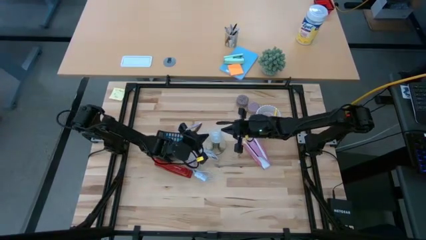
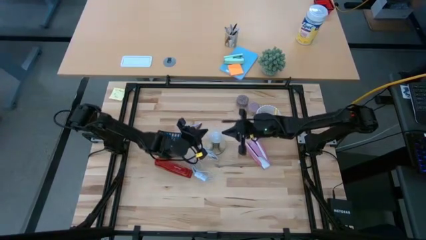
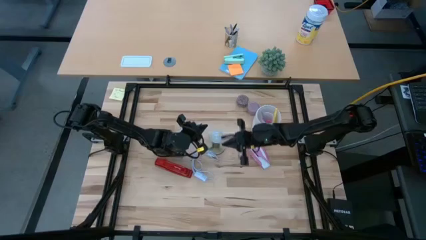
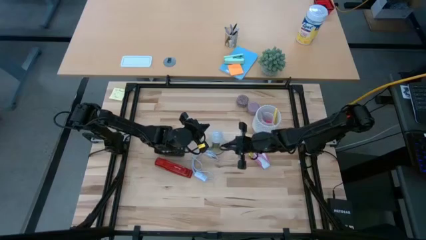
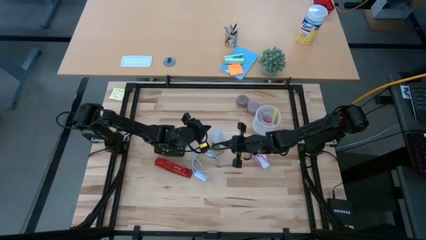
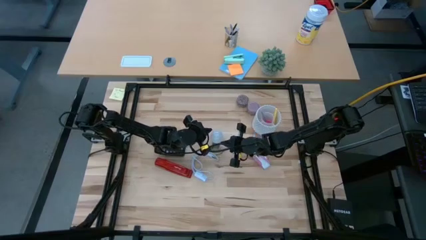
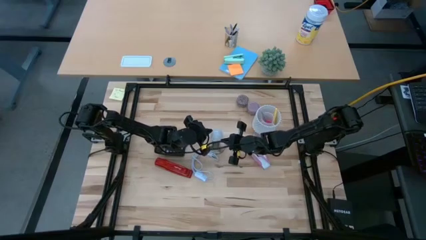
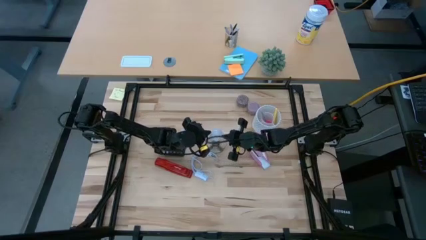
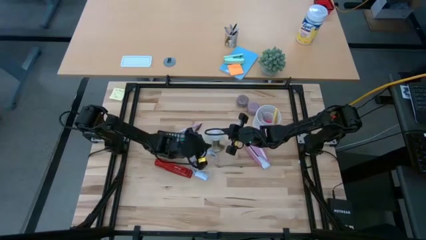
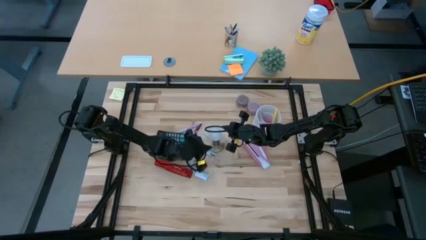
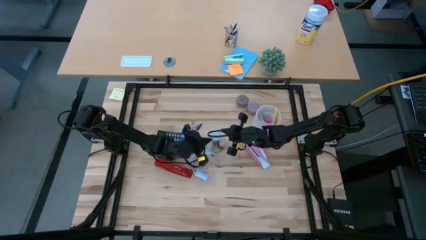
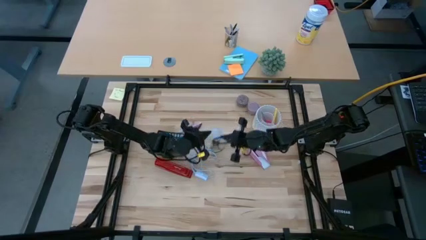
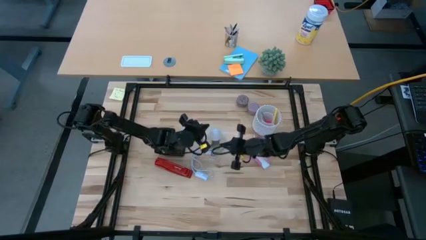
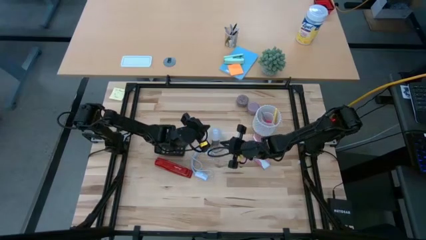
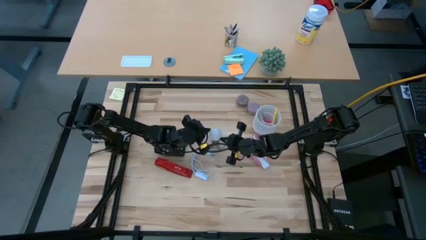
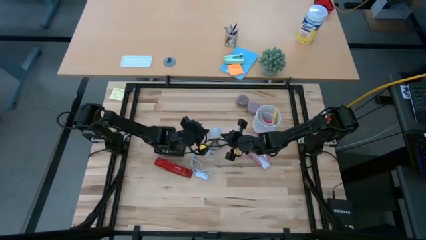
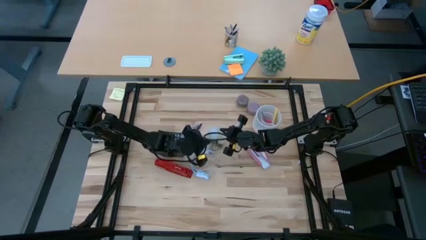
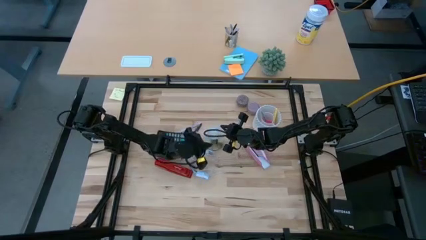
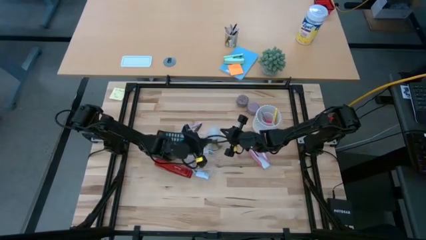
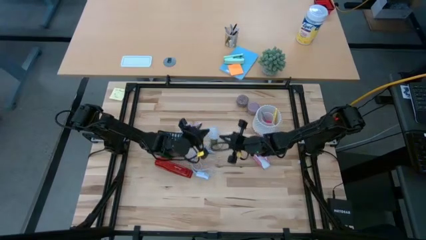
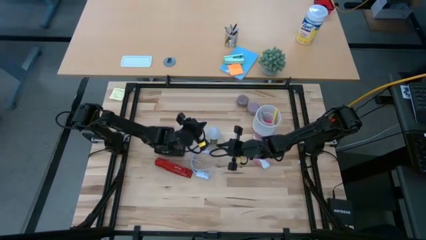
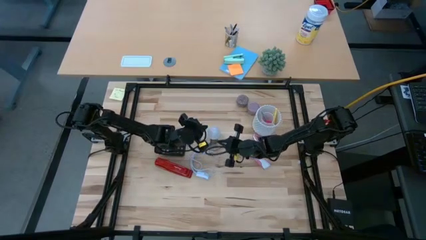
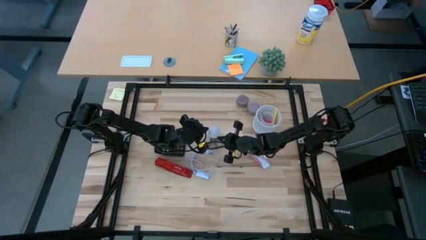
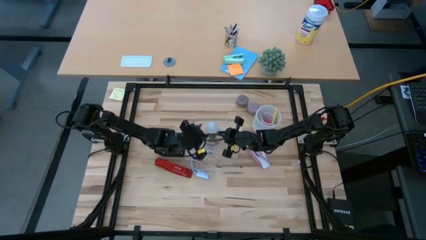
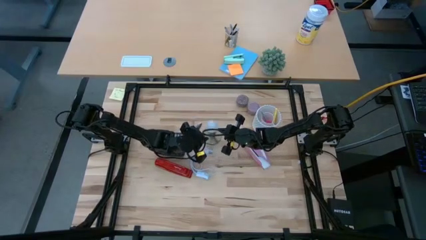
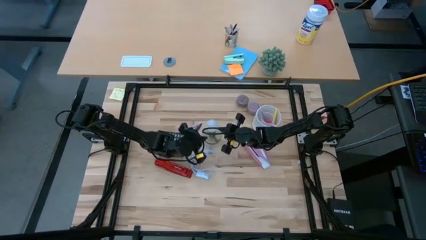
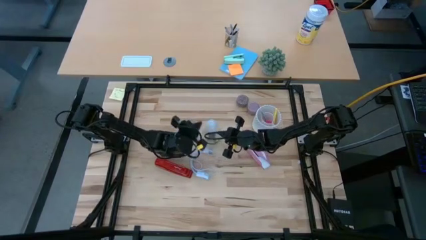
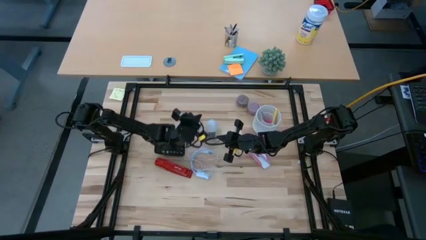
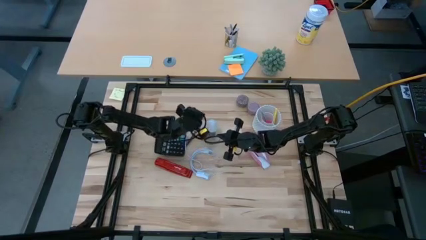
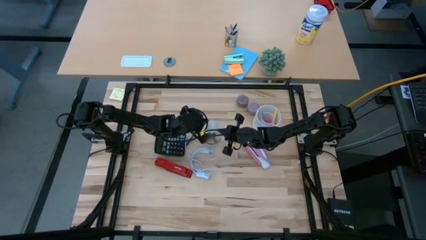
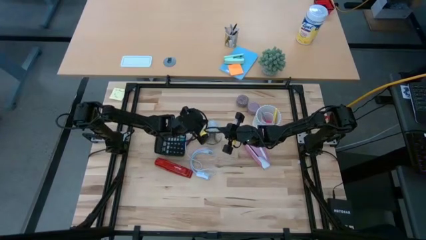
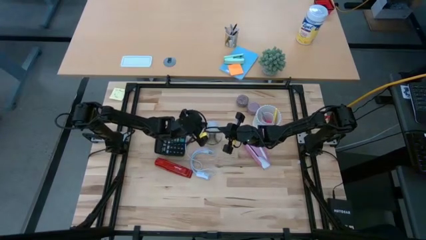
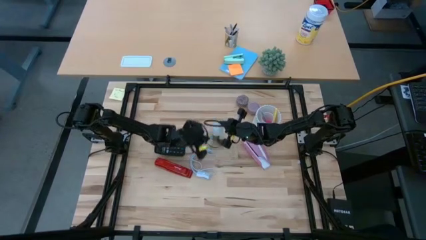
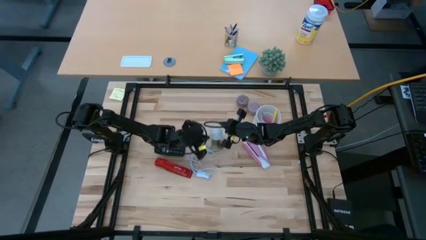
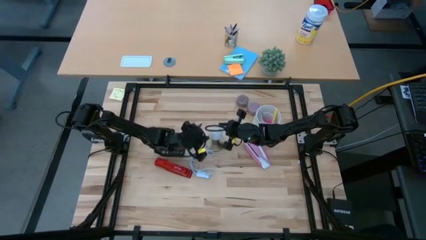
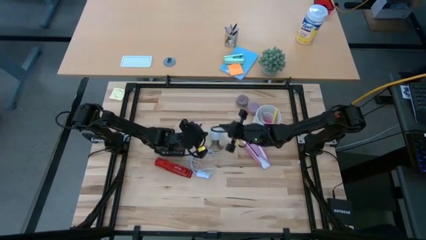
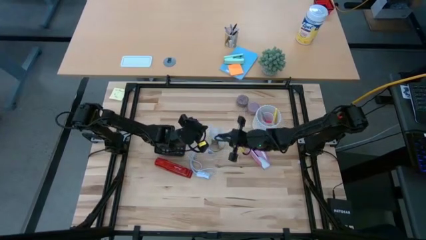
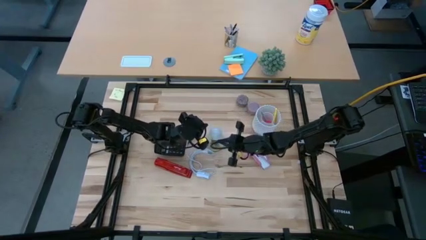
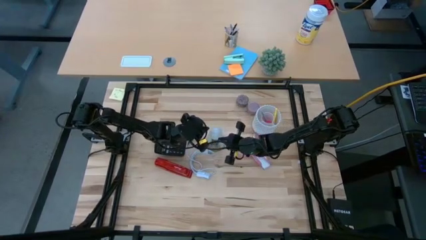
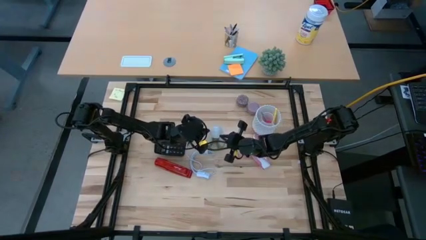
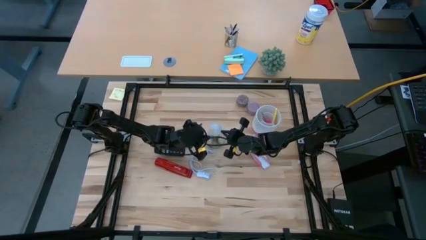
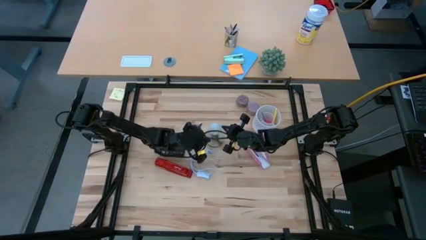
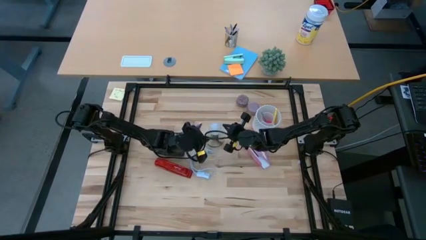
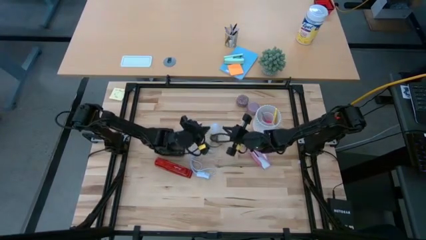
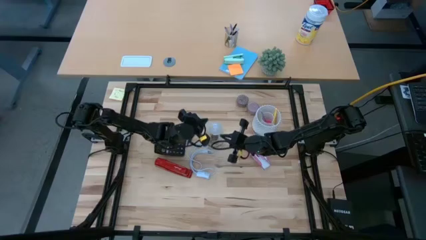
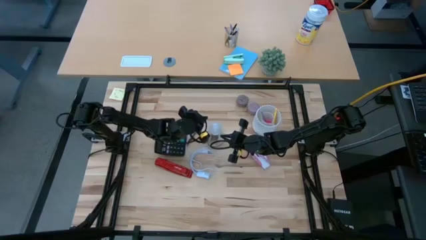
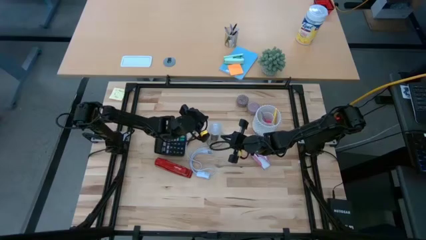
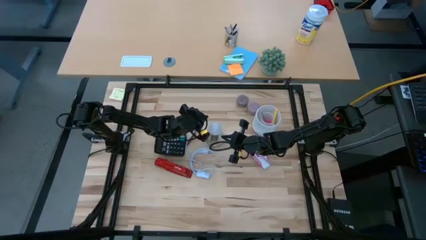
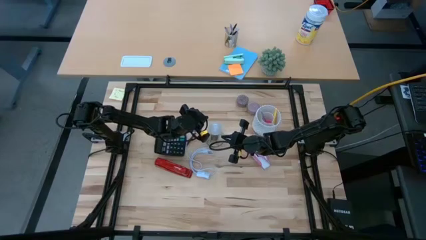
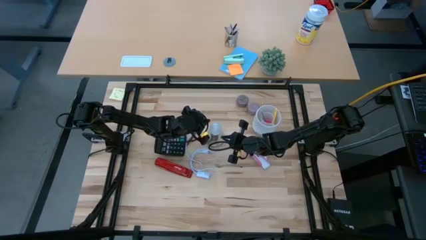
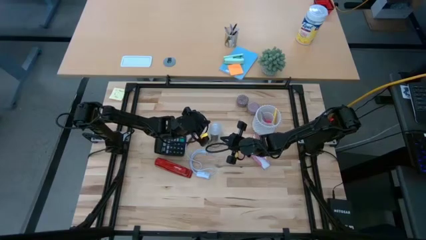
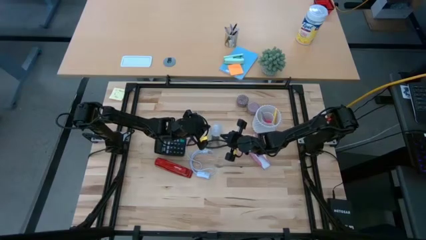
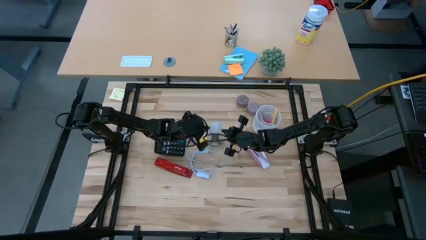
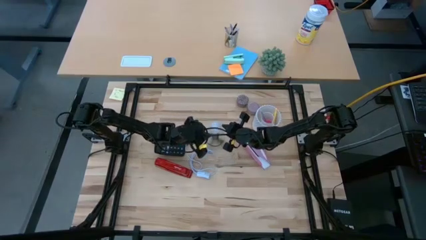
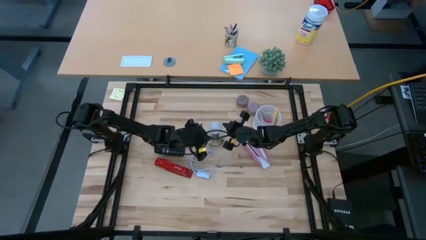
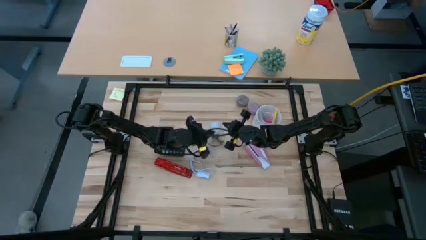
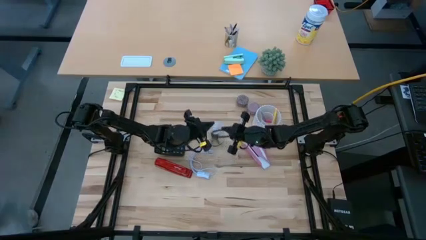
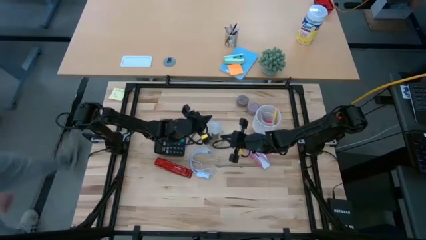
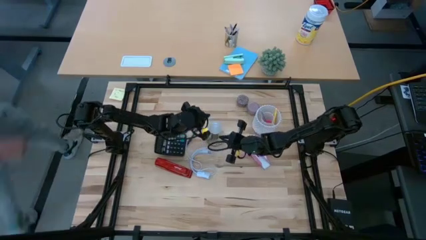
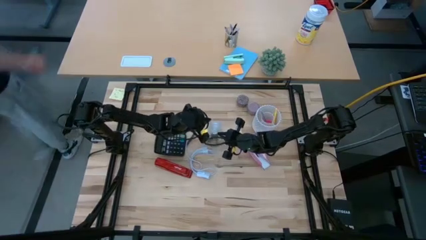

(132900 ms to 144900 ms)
Task: Screw lightbulb
Remove the white lightbulb from the golden lamp
